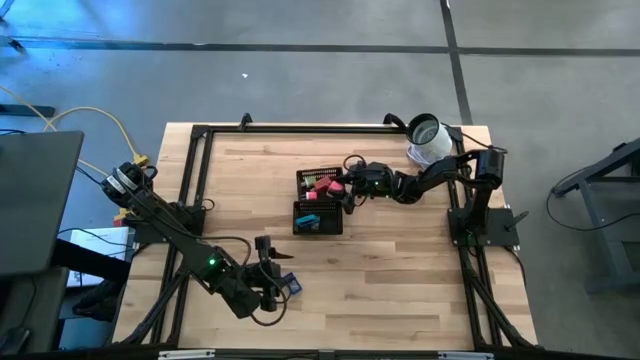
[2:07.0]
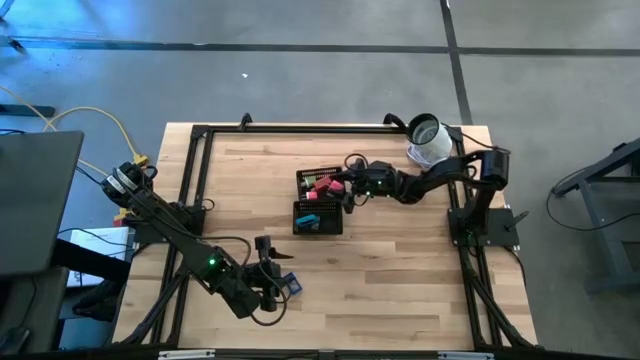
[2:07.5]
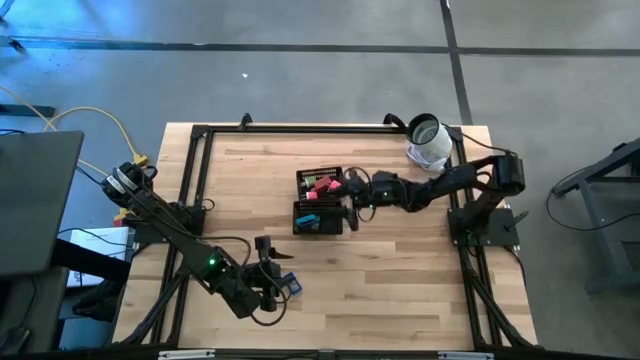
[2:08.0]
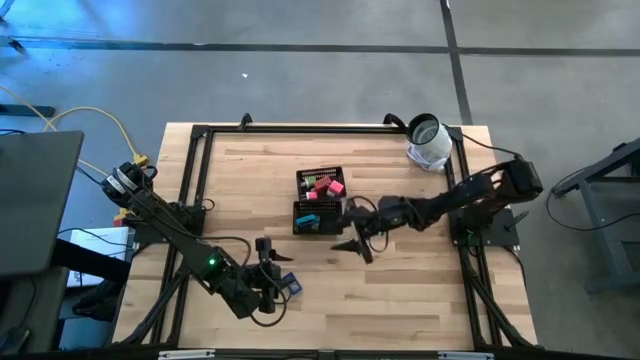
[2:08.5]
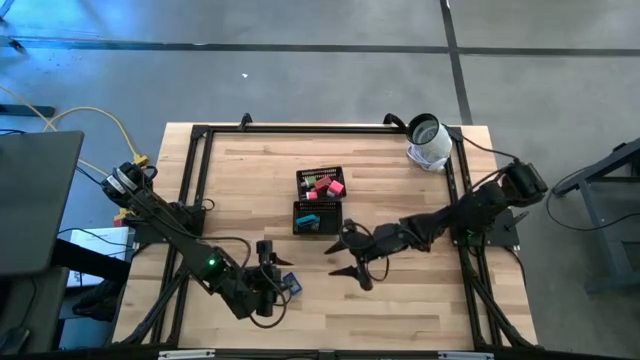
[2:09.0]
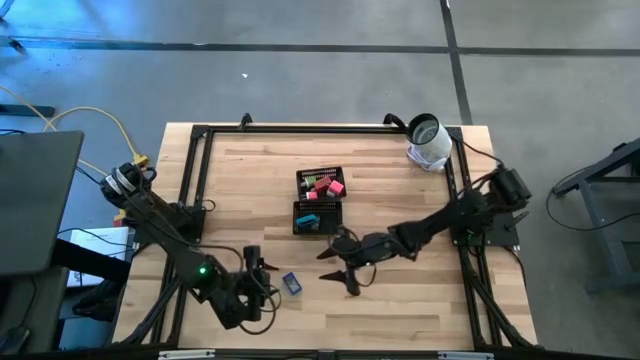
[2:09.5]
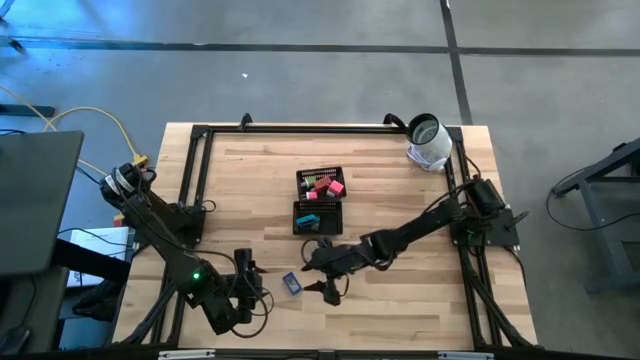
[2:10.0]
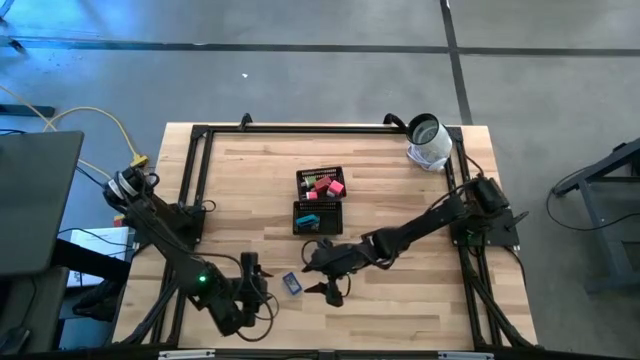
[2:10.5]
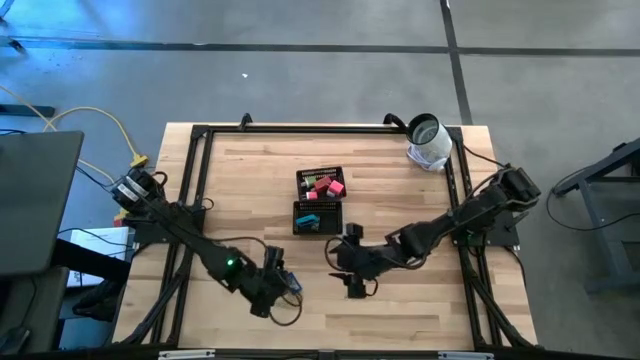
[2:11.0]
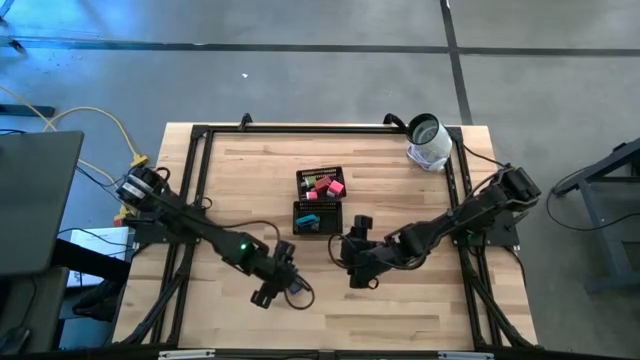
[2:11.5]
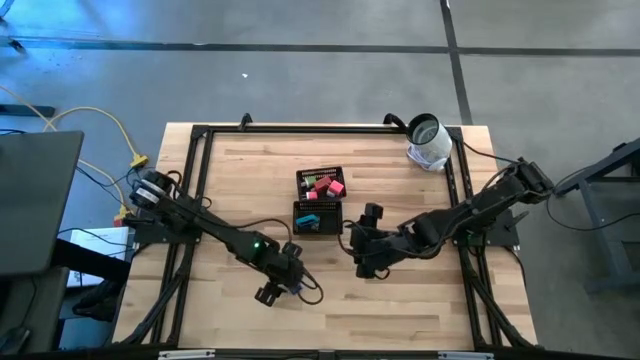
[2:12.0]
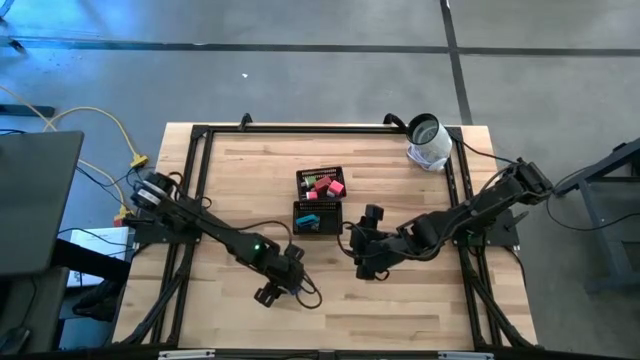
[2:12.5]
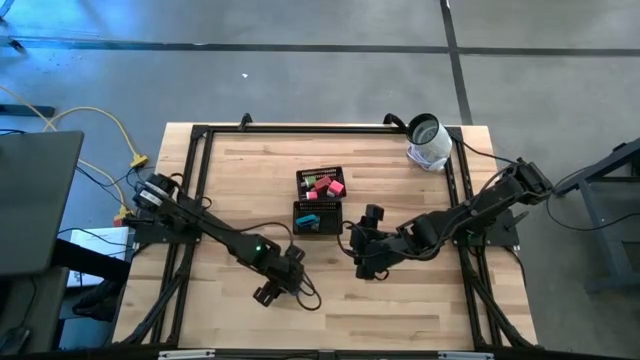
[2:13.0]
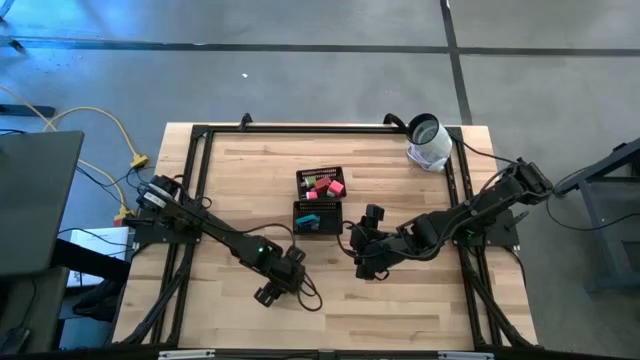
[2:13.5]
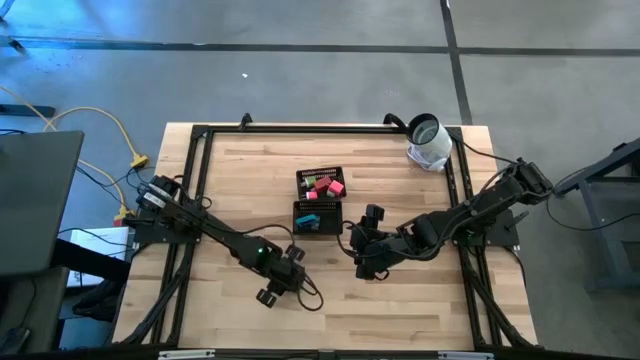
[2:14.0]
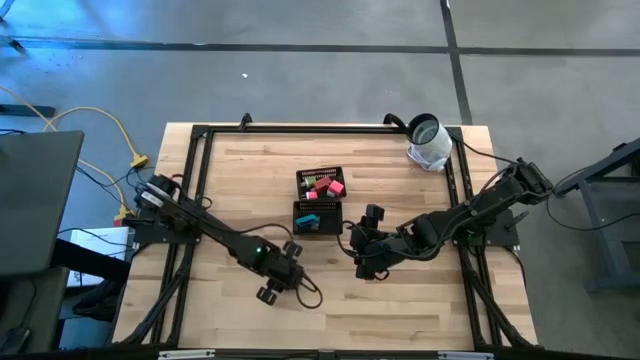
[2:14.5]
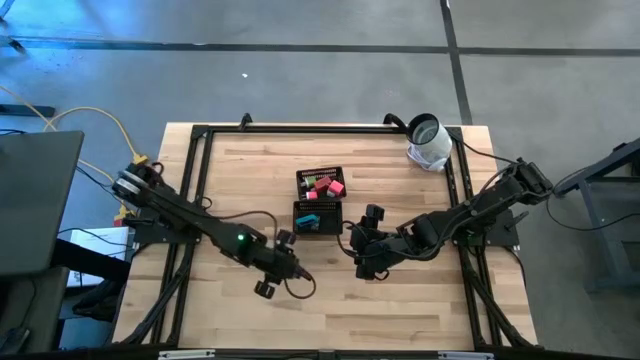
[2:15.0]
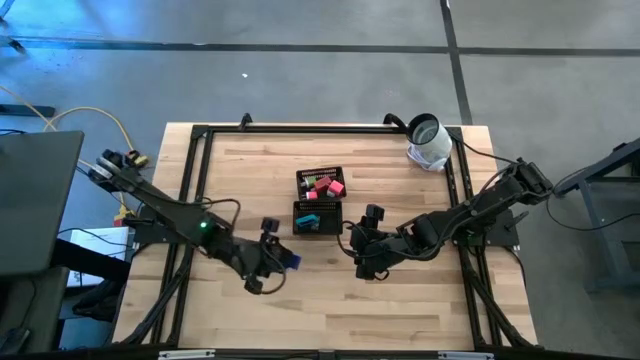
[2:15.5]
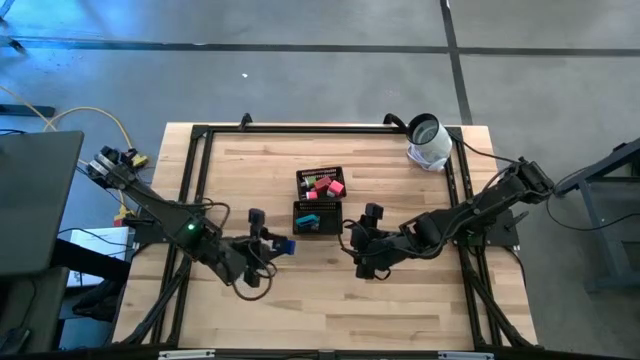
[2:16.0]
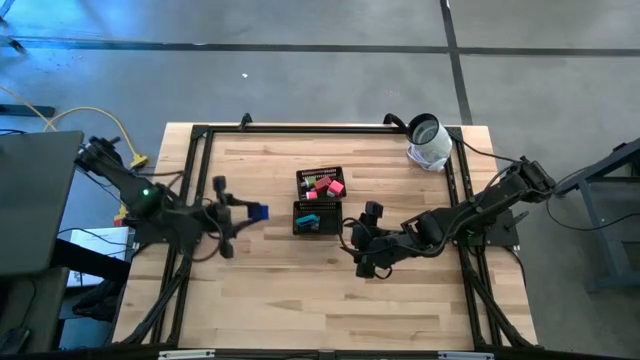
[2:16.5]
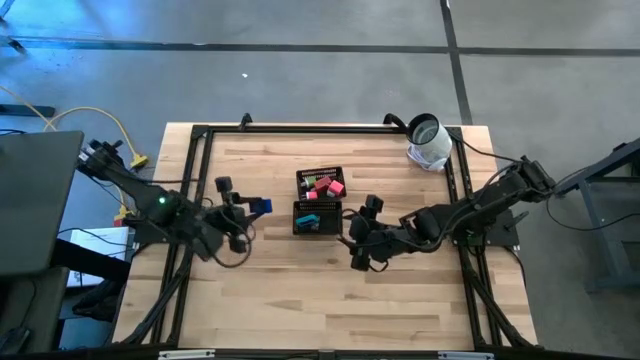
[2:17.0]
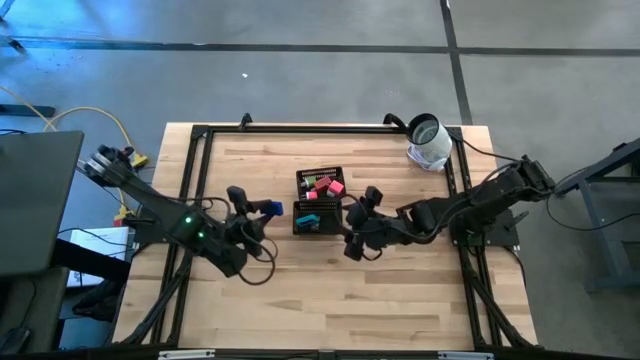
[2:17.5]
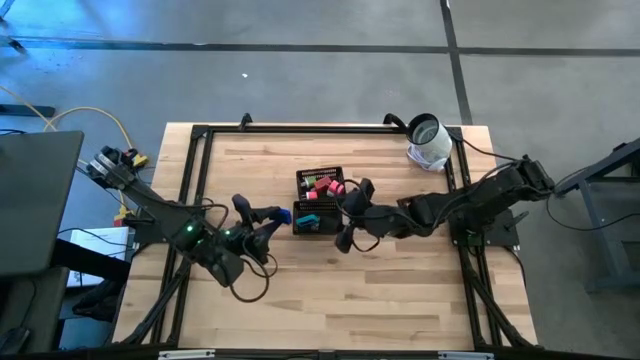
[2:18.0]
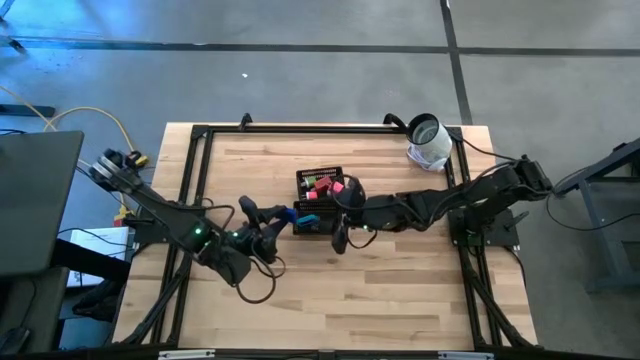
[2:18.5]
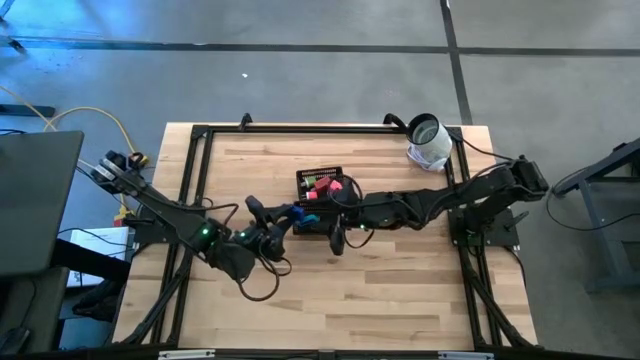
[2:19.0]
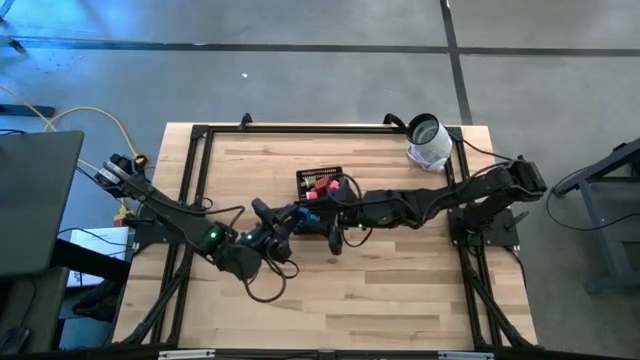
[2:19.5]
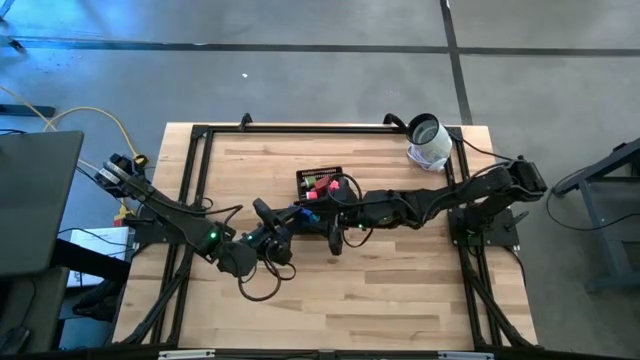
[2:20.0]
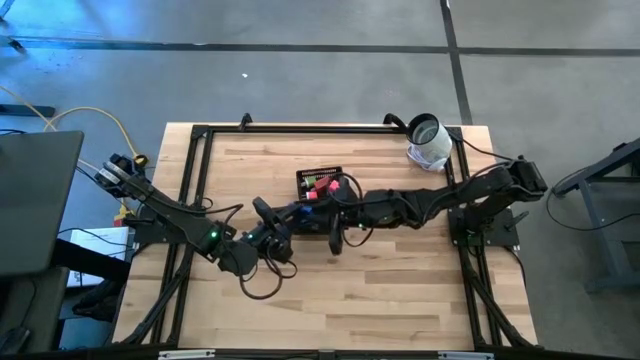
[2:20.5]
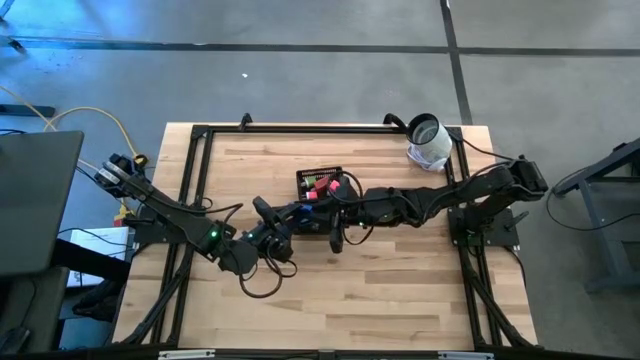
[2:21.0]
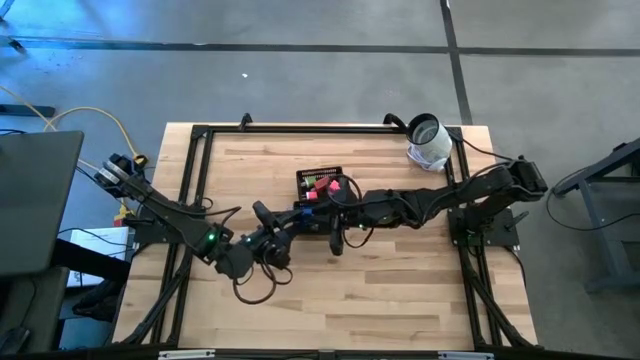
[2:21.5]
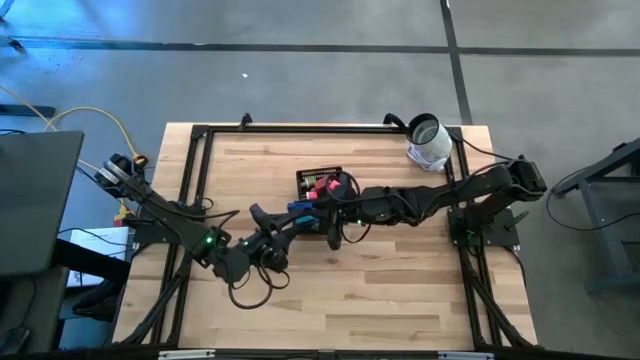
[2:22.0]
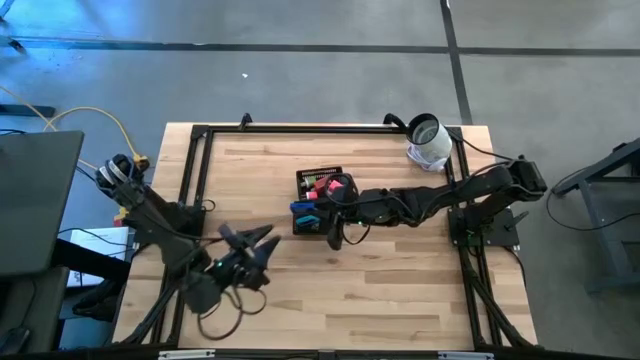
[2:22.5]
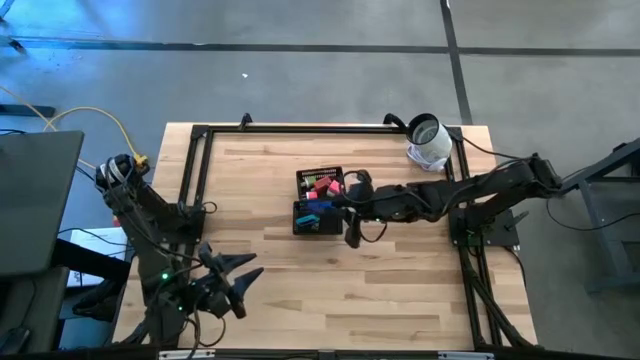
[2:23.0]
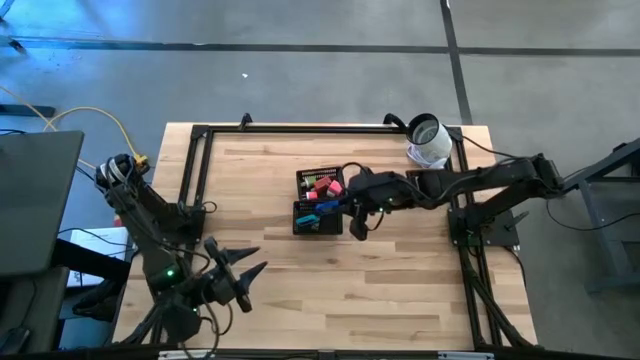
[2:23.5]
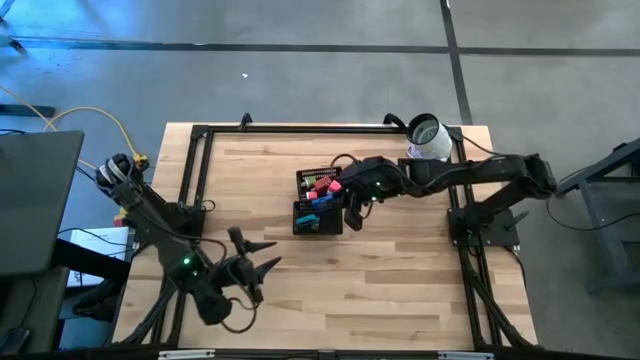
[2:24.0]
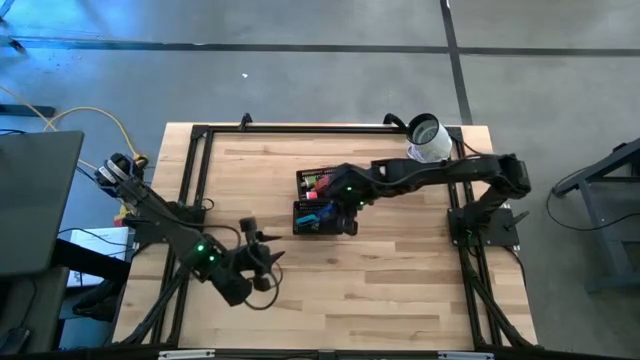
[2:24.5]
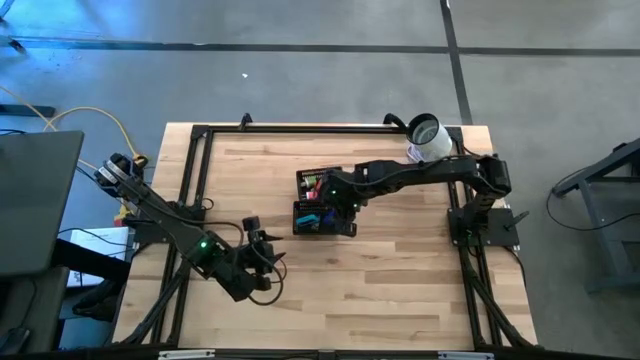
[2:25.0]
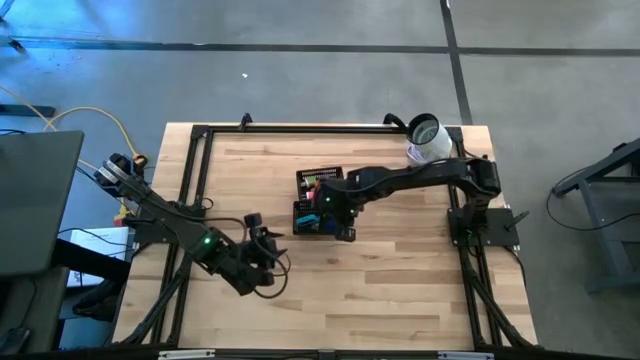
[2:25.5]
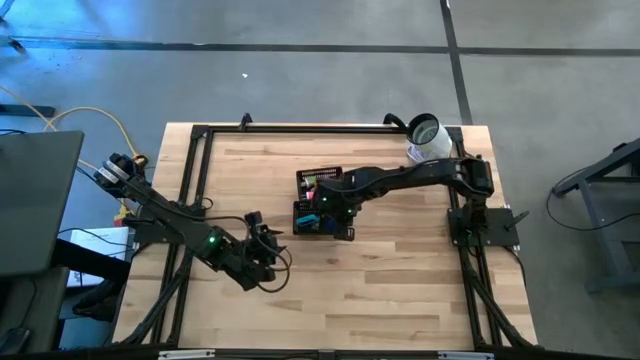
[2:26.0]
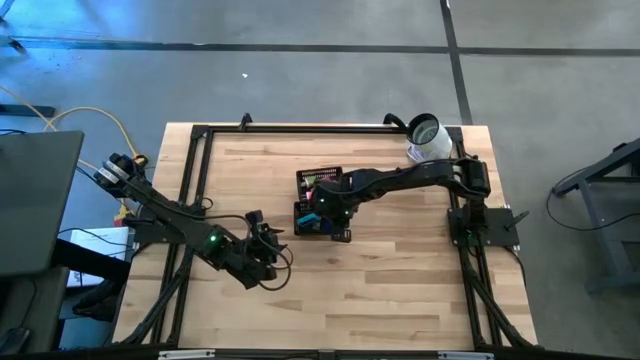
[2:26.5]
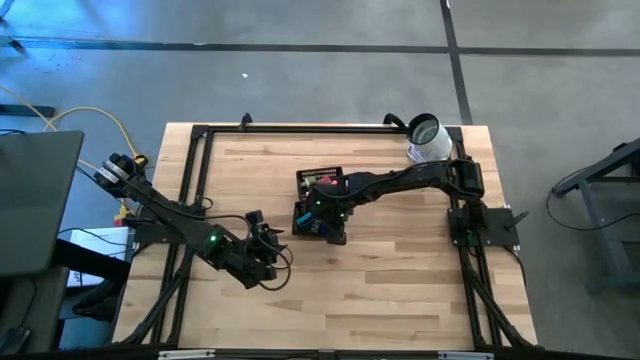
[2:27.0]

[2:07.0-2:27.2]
Task: Pick & Place Office items
Put the blue digital clock into the bottom black bin
